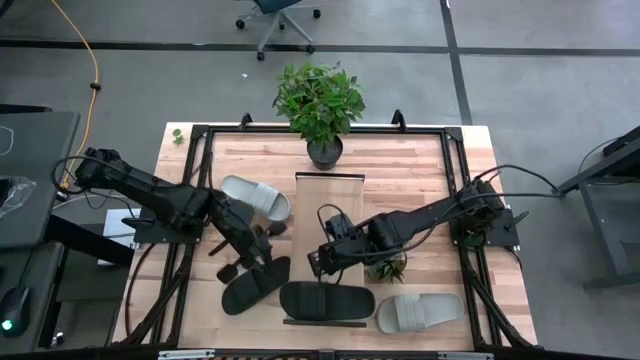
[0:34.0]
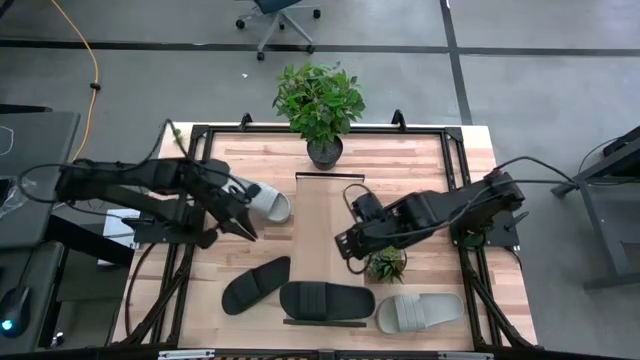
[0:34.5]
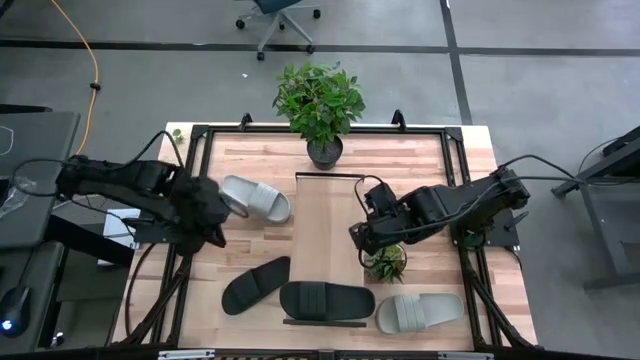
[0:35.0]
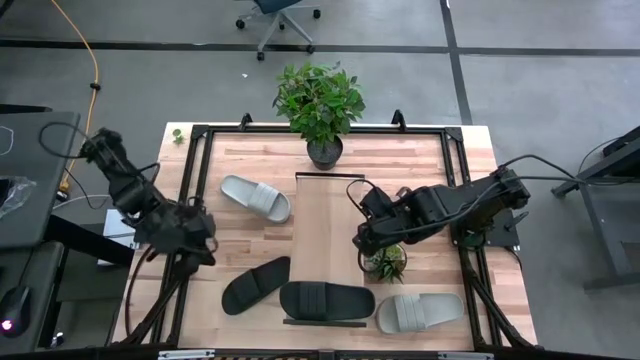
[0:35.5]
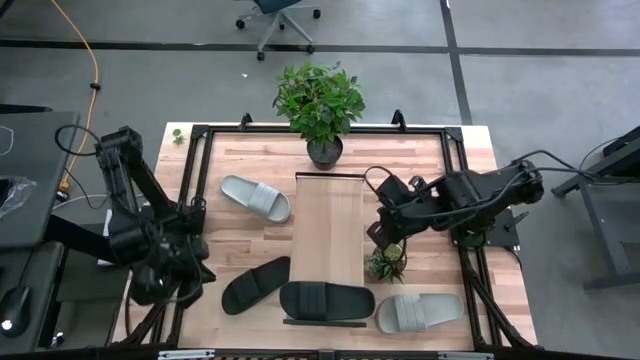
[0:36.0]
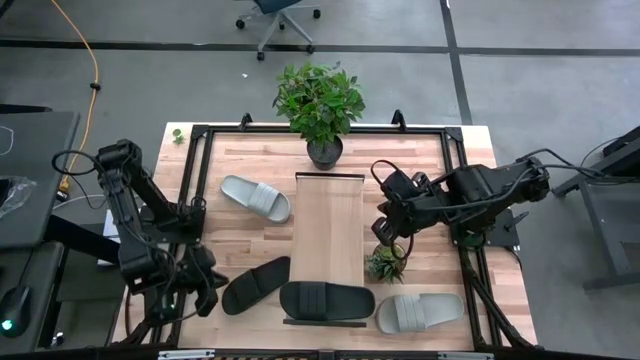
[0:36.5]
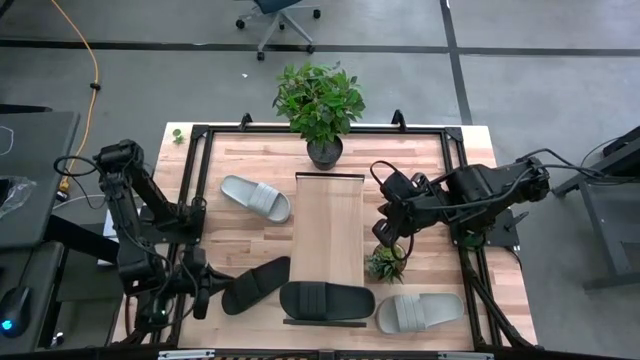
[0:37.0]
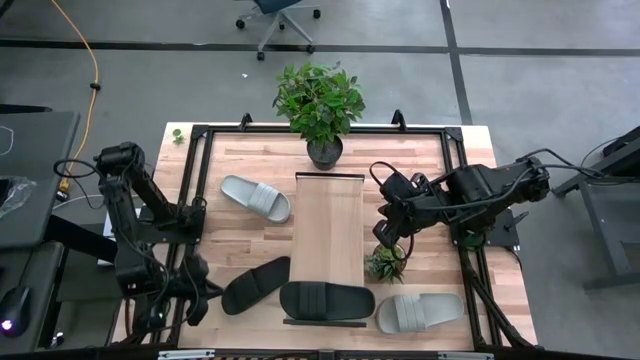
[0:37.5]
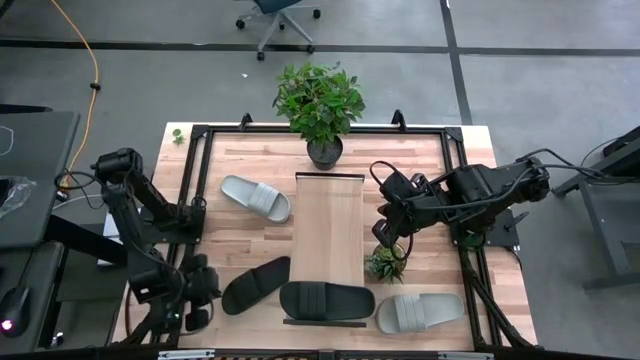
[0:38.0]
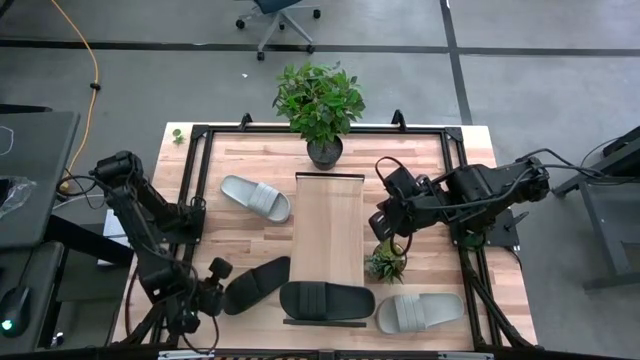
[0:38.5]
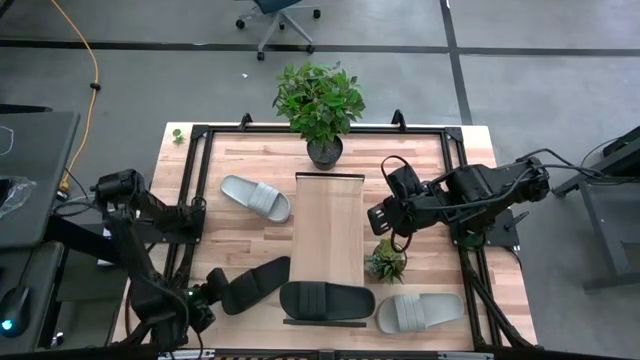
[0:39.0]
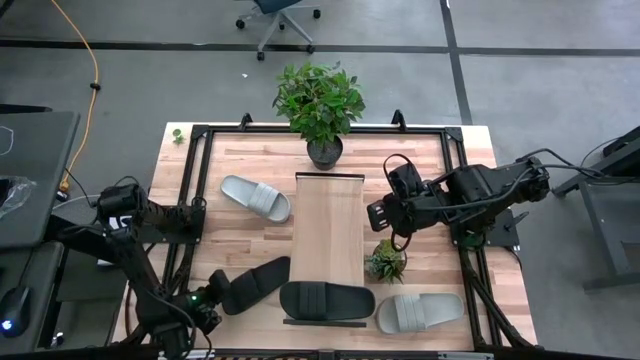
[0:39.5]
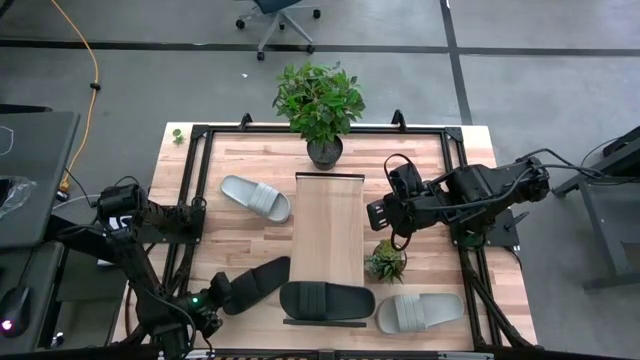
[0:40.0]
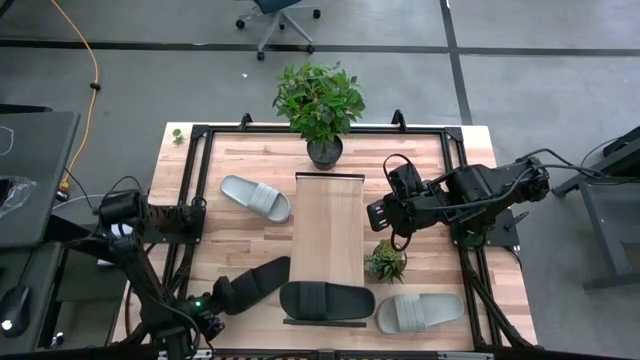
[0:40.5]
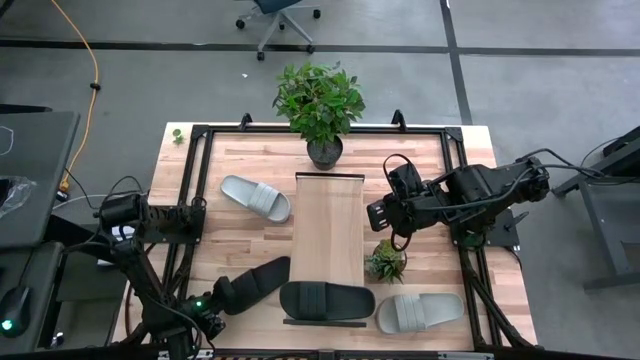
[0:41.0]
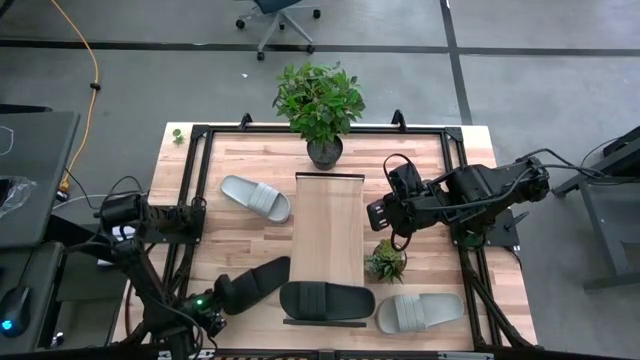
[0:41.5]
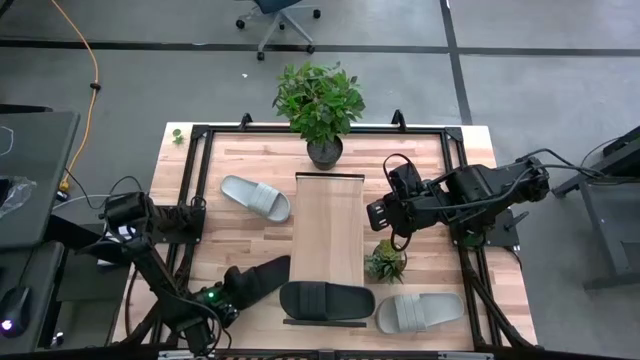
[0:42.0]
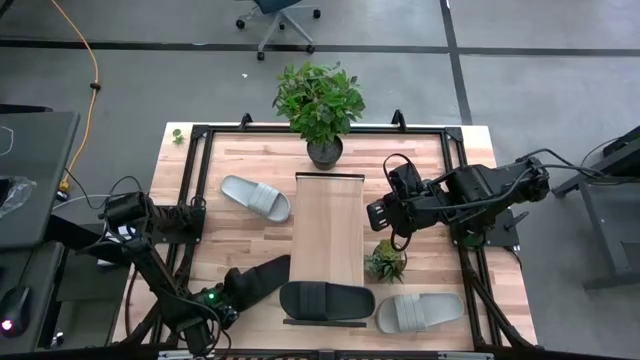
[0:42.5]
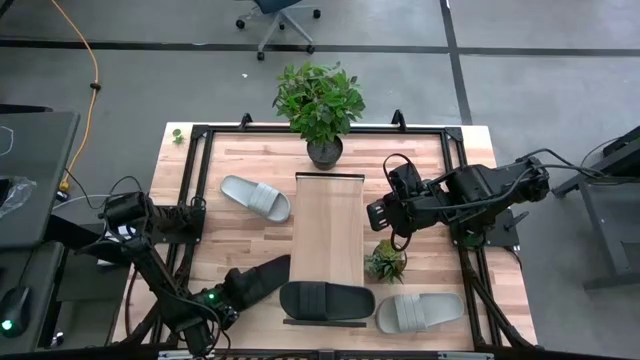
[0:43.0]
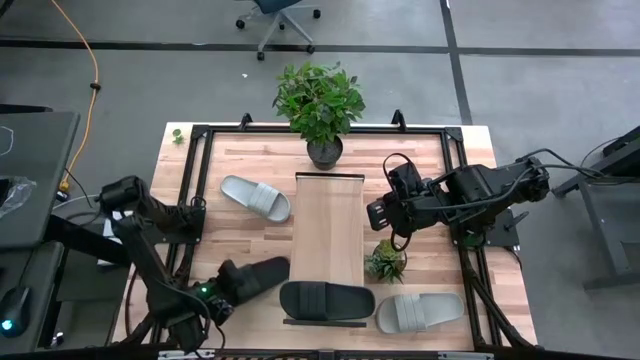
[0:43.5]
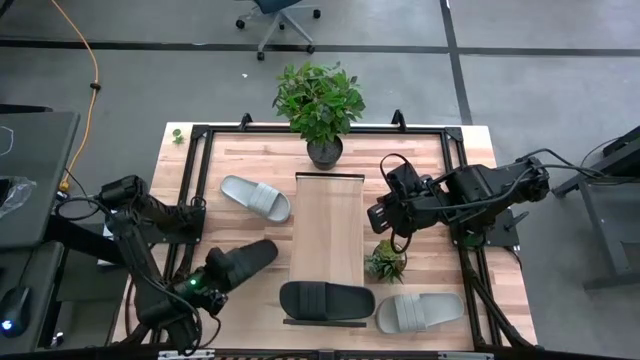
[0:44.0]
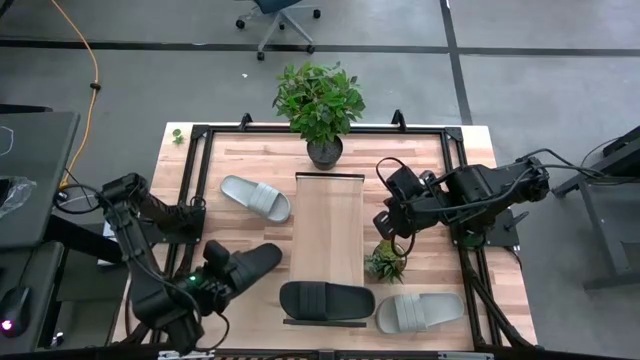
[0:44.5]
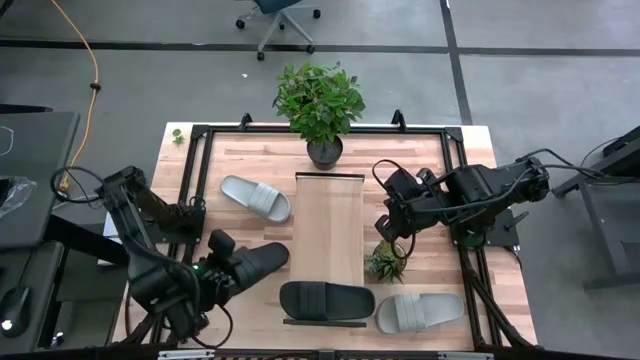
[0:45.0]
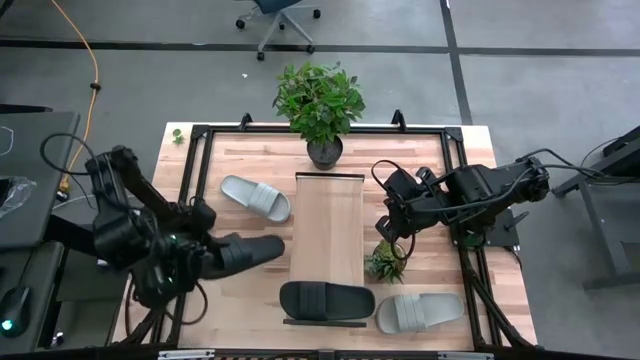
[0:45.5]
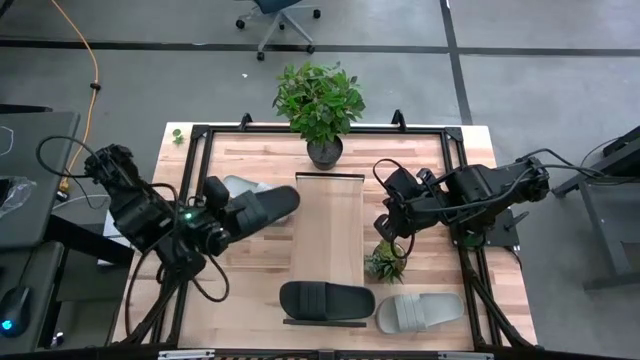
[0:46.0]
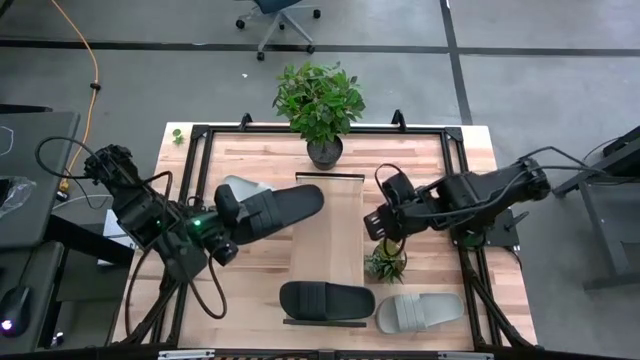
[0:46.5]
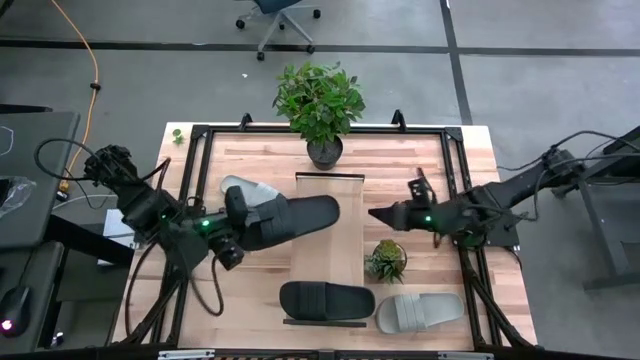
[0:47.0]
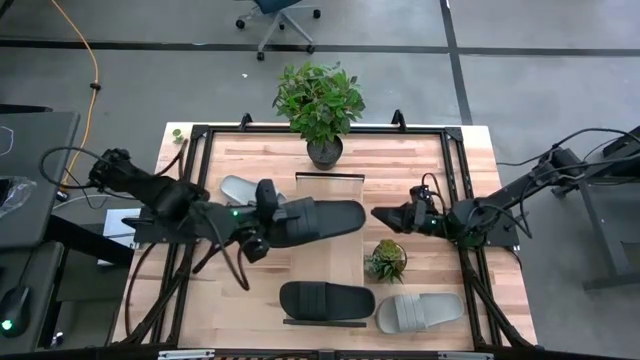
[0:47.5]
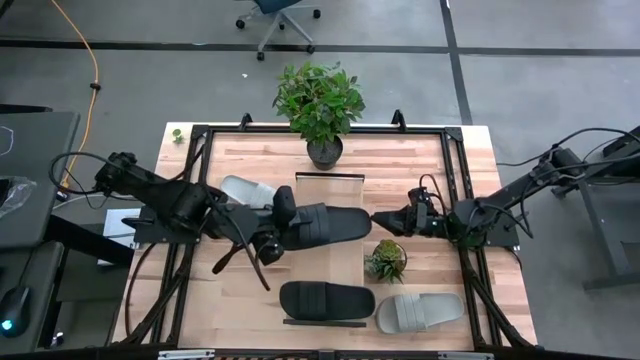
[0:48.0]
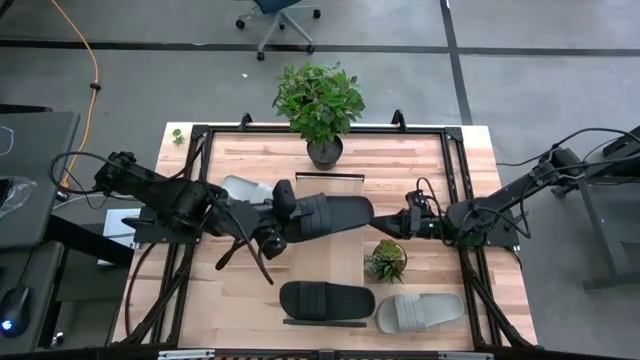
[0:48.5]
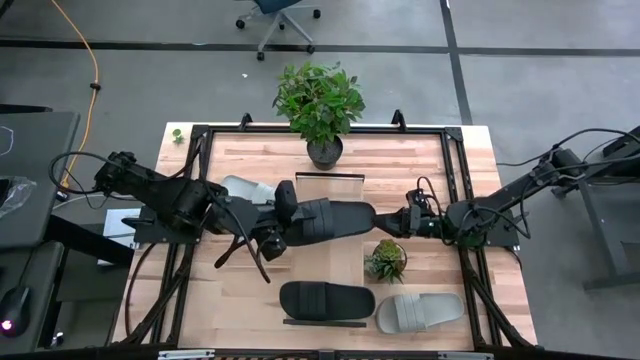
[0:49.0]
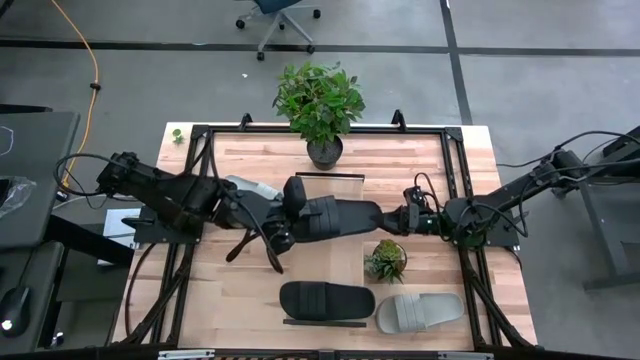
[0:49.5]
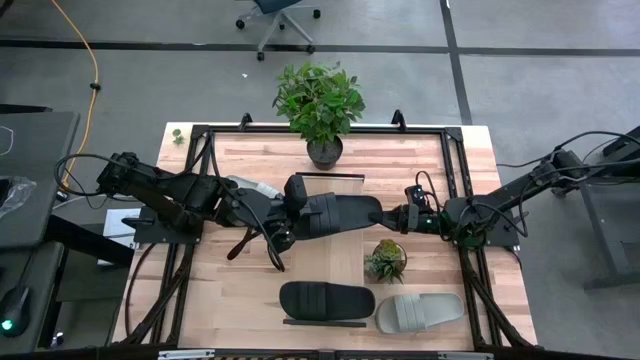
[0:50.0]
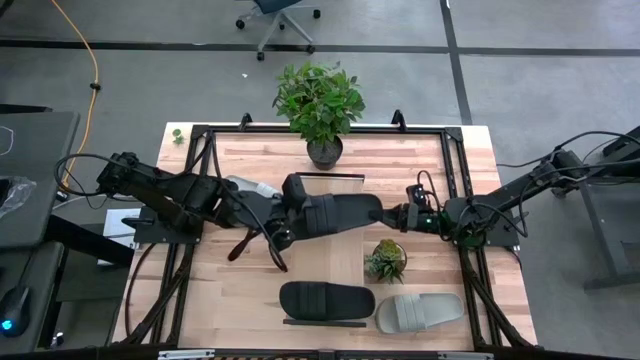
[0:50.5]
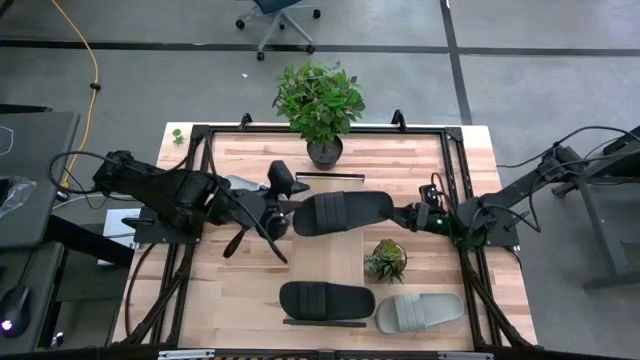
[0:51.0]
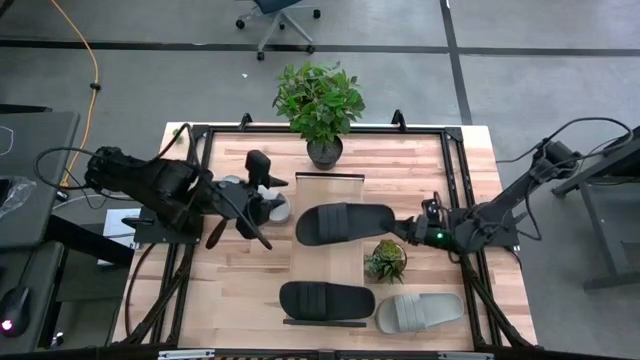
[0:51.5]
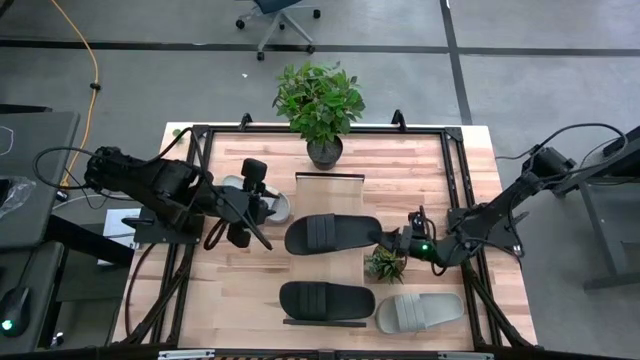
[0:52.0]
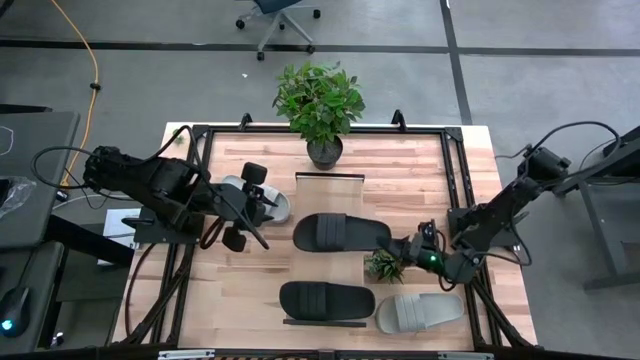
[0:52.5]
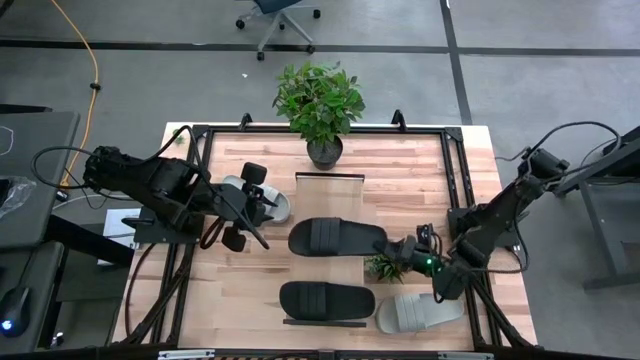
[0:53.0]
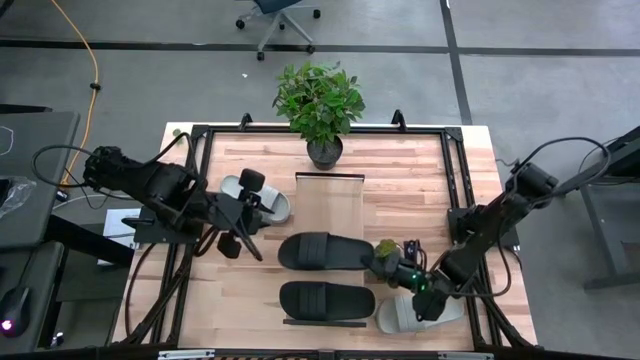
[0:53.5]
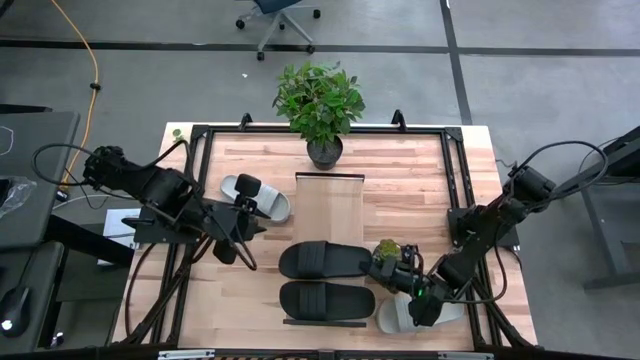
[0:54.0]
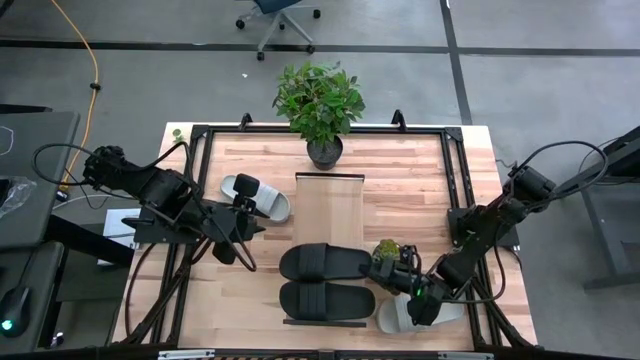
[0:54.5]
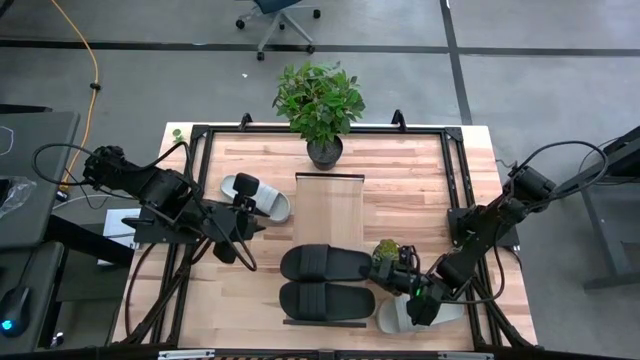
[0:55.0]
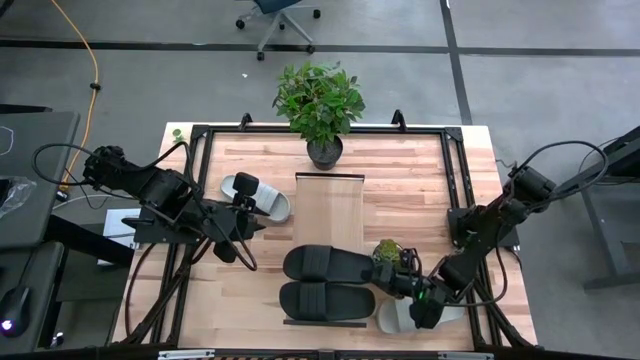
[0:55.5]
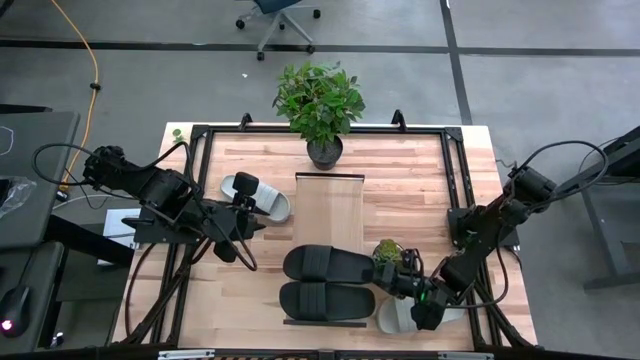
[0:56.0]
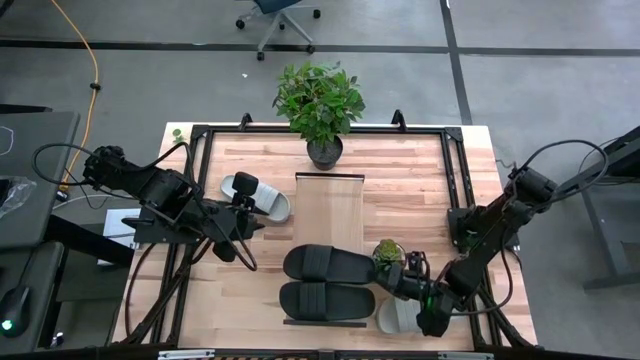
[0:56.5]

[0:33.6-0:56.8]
Task: Pick and place slides into the shelf
Put the black slide into the shelf
